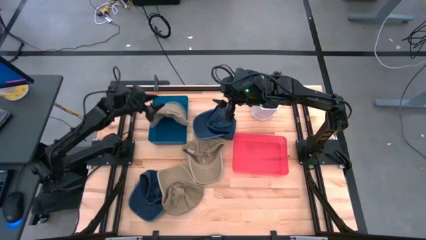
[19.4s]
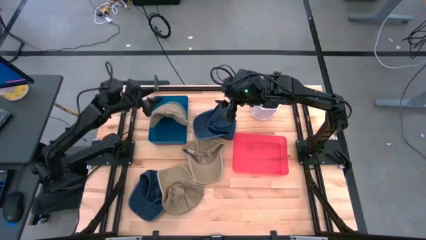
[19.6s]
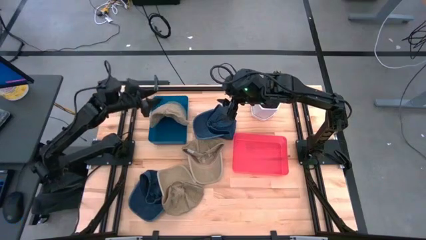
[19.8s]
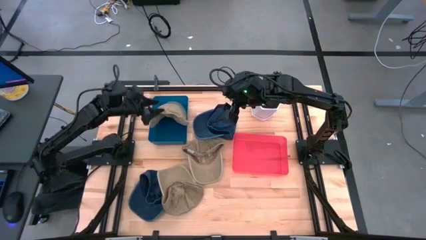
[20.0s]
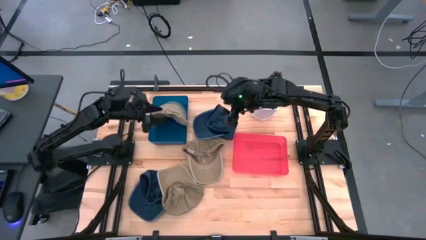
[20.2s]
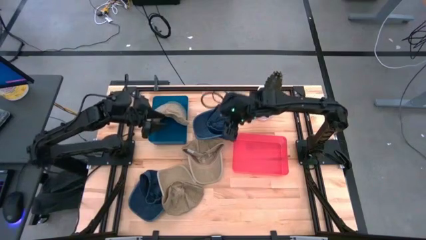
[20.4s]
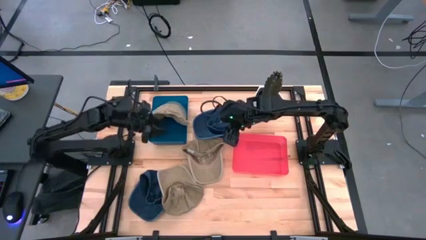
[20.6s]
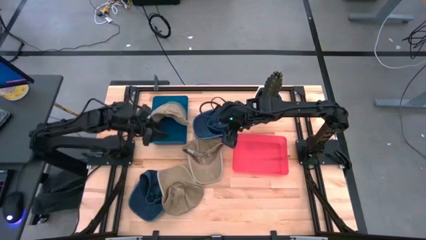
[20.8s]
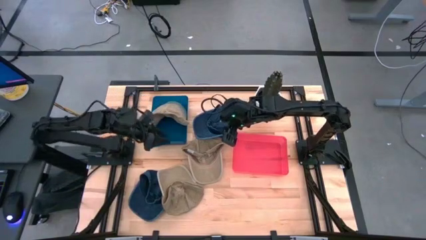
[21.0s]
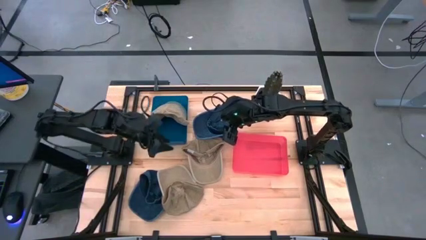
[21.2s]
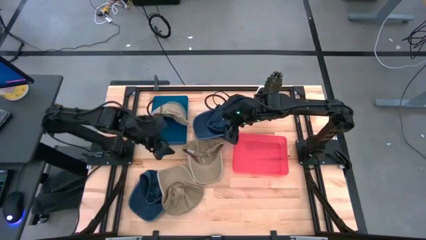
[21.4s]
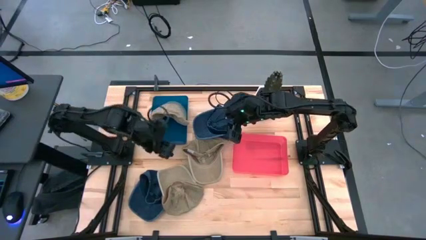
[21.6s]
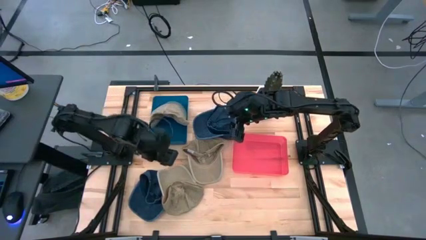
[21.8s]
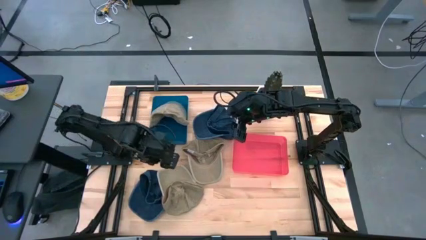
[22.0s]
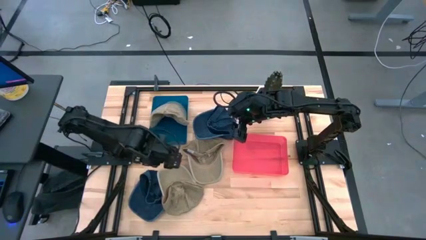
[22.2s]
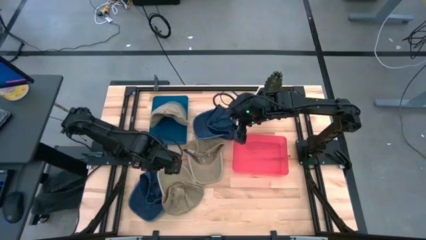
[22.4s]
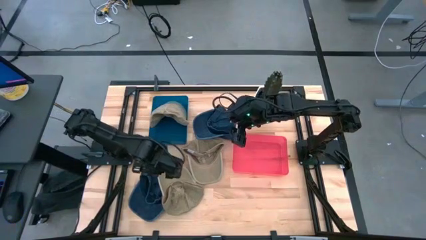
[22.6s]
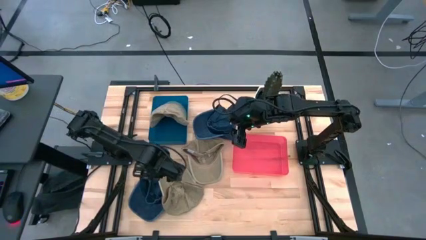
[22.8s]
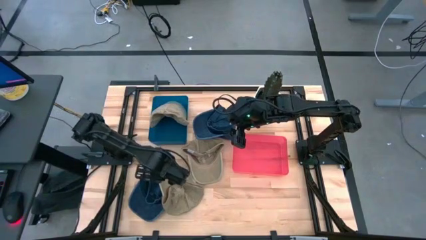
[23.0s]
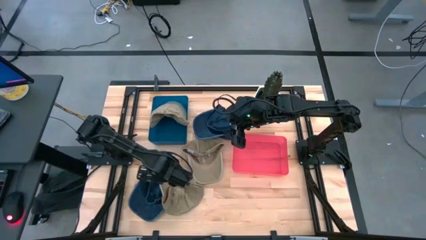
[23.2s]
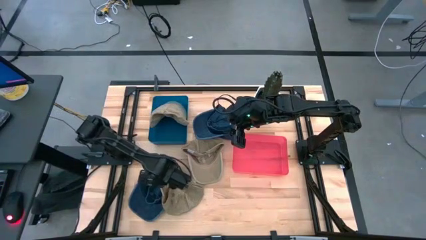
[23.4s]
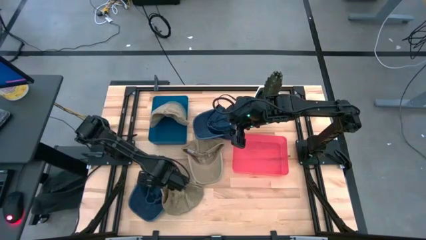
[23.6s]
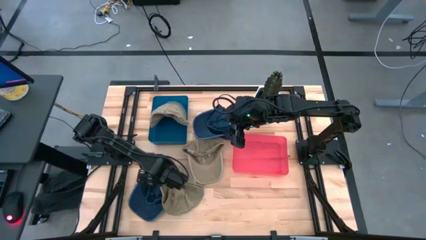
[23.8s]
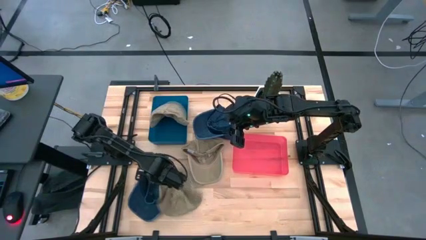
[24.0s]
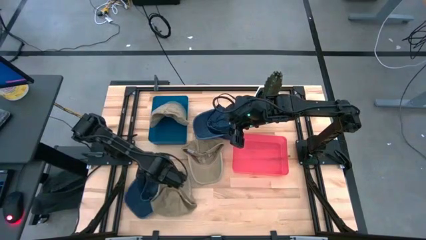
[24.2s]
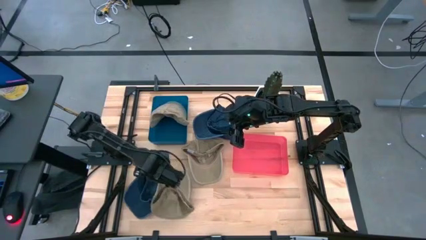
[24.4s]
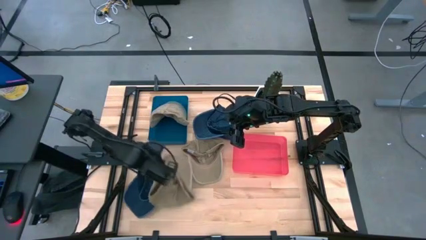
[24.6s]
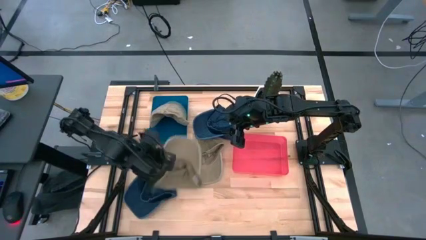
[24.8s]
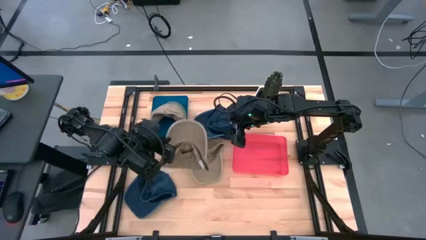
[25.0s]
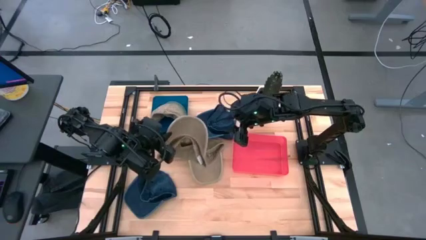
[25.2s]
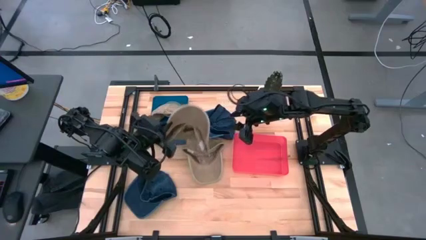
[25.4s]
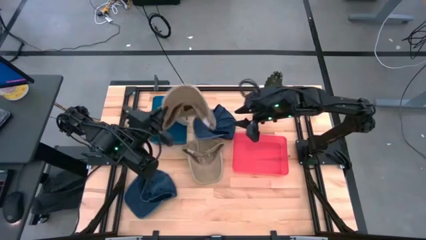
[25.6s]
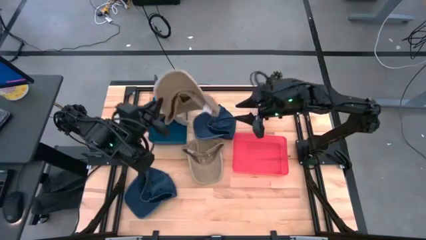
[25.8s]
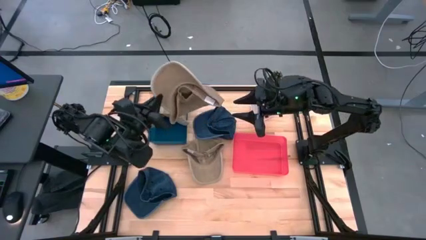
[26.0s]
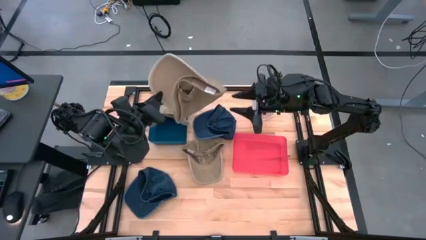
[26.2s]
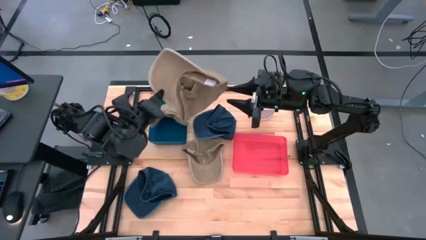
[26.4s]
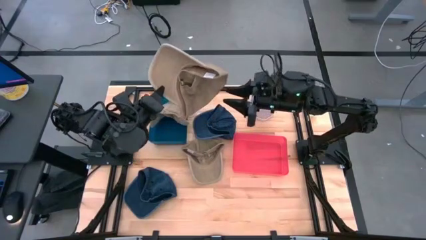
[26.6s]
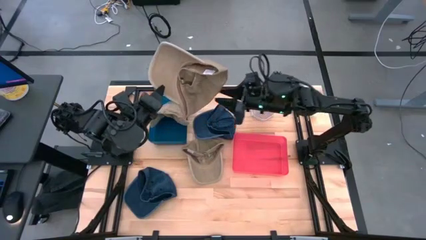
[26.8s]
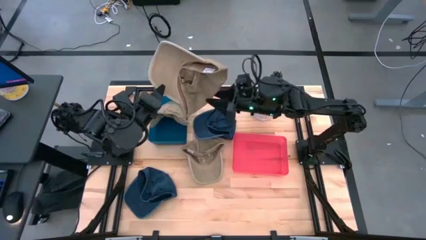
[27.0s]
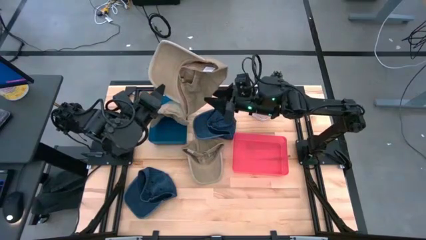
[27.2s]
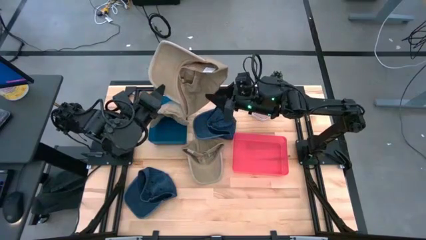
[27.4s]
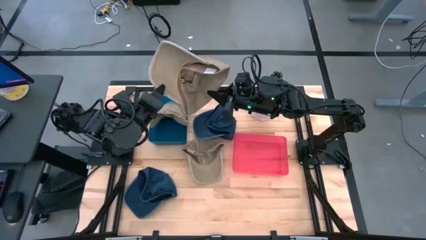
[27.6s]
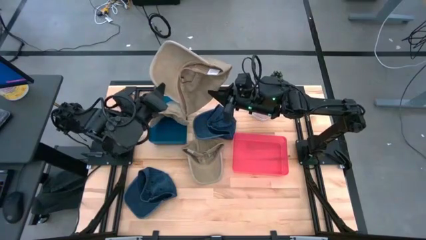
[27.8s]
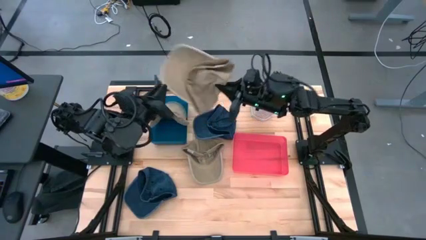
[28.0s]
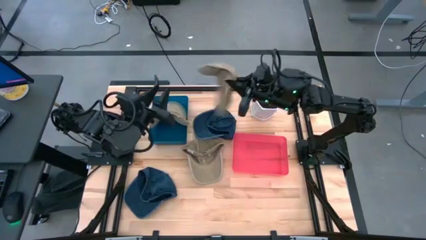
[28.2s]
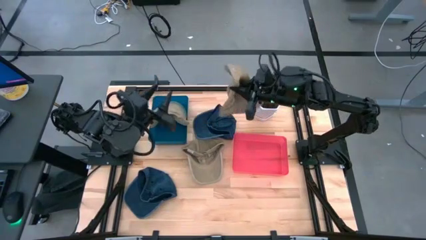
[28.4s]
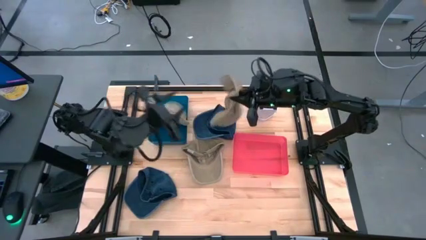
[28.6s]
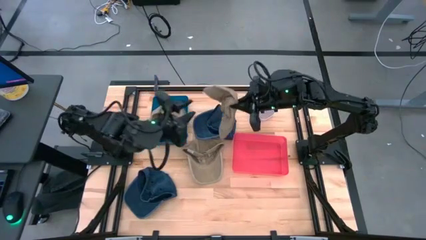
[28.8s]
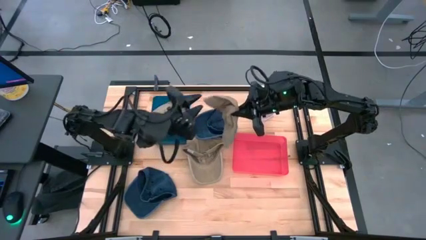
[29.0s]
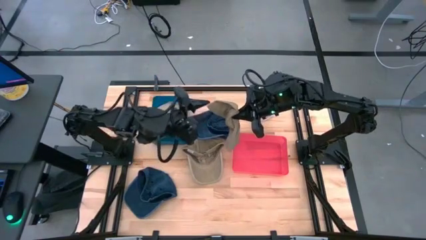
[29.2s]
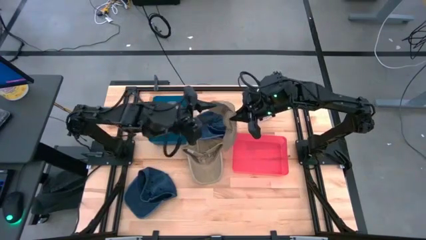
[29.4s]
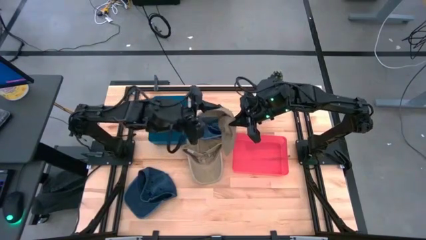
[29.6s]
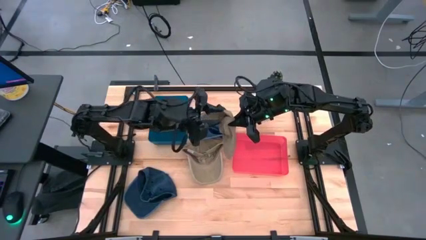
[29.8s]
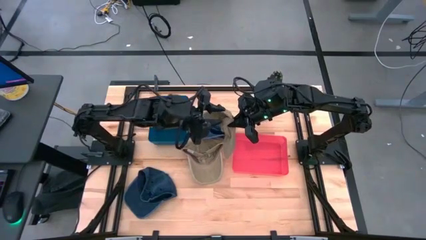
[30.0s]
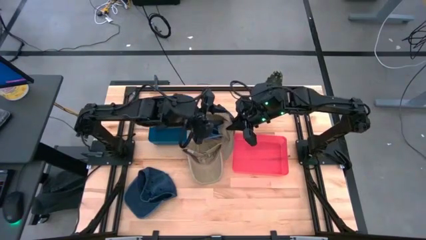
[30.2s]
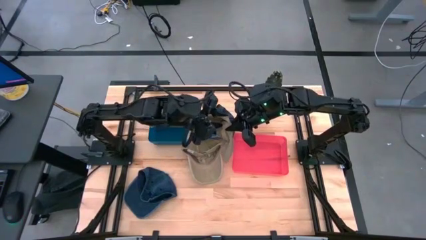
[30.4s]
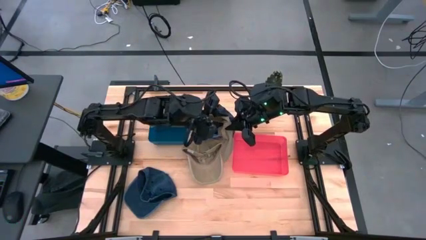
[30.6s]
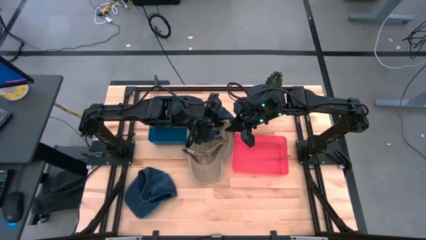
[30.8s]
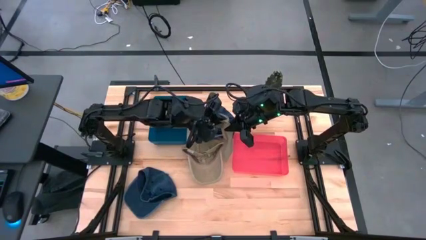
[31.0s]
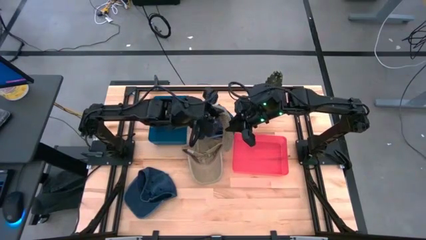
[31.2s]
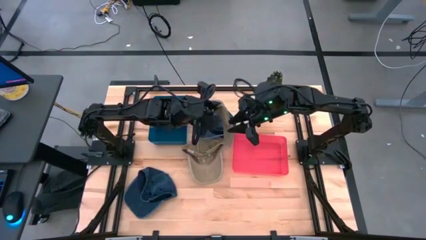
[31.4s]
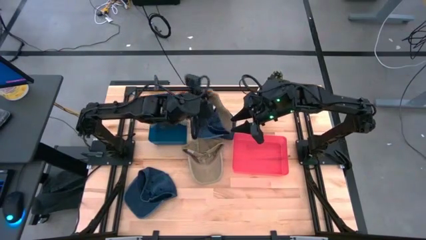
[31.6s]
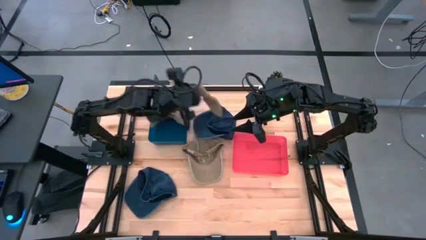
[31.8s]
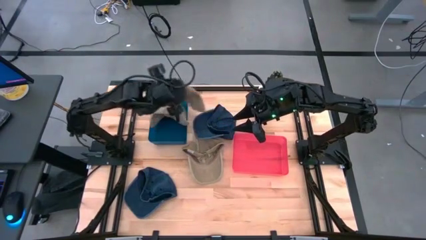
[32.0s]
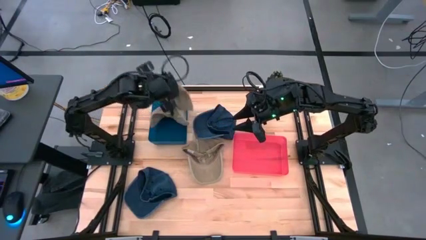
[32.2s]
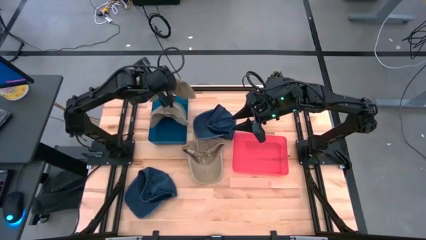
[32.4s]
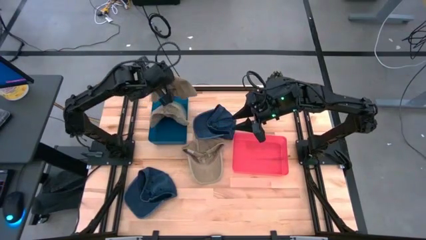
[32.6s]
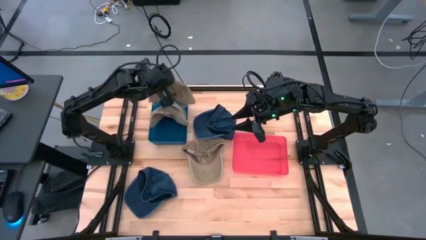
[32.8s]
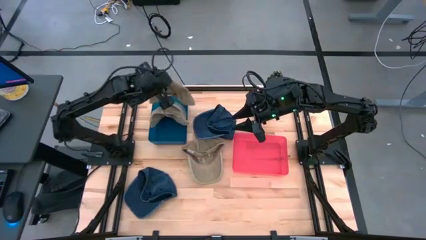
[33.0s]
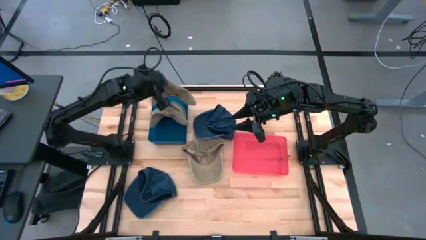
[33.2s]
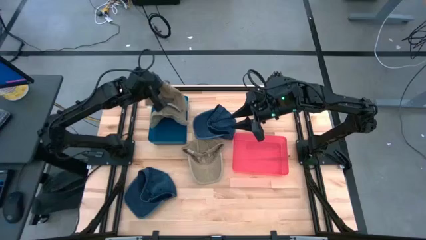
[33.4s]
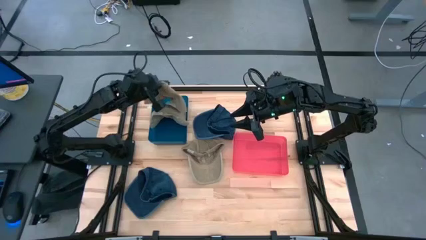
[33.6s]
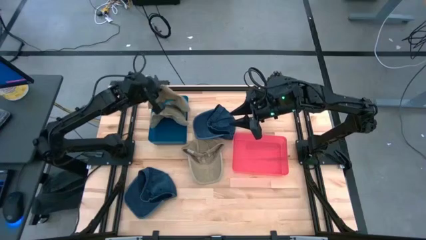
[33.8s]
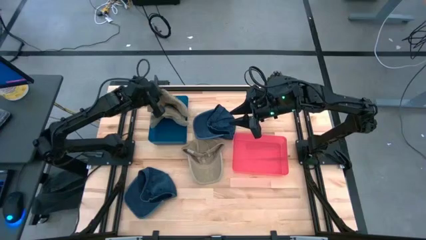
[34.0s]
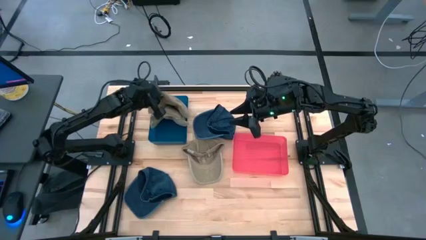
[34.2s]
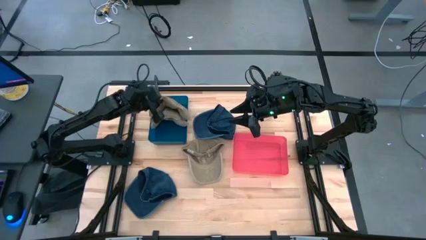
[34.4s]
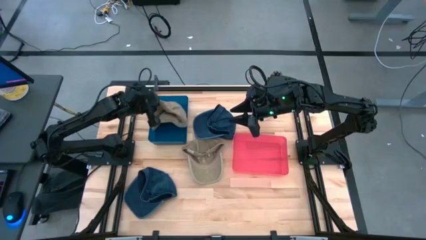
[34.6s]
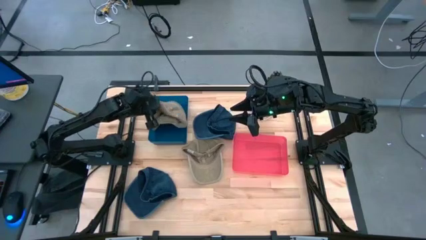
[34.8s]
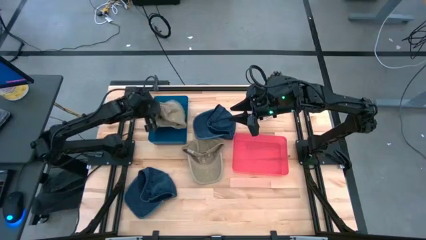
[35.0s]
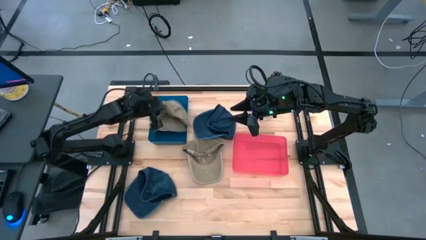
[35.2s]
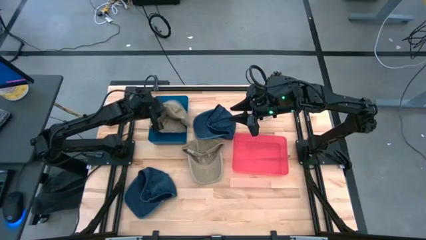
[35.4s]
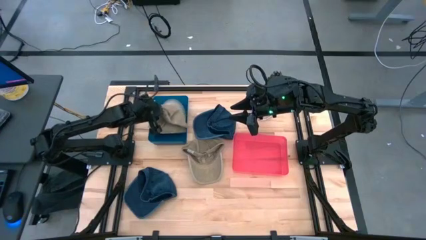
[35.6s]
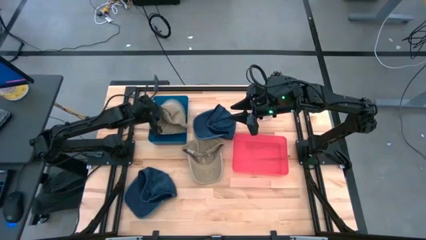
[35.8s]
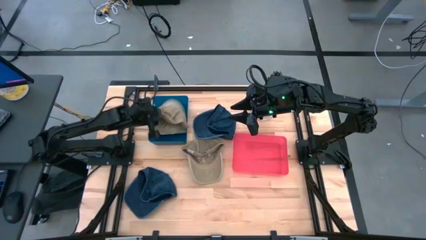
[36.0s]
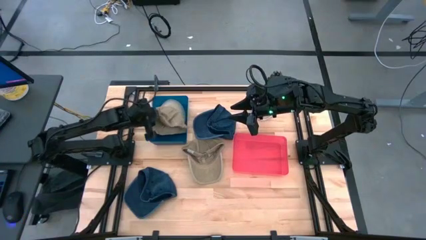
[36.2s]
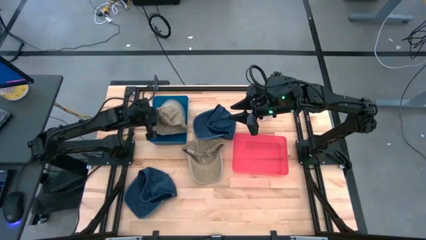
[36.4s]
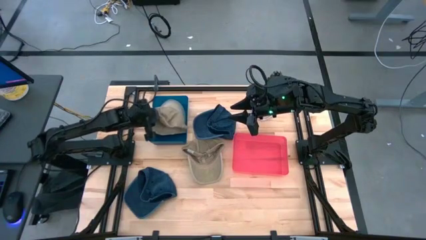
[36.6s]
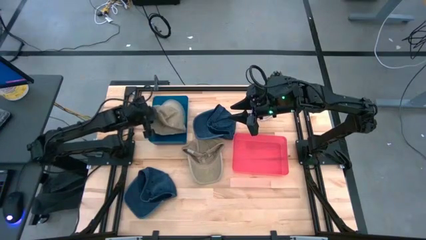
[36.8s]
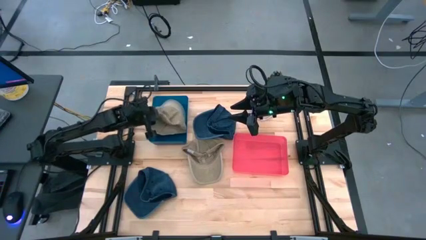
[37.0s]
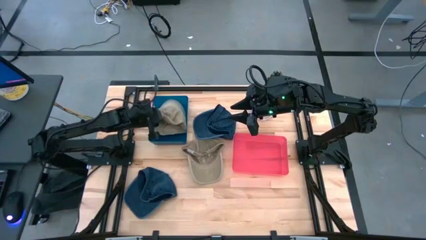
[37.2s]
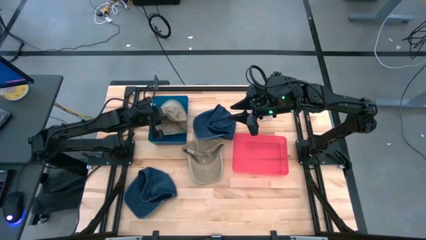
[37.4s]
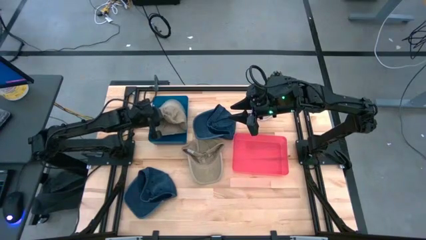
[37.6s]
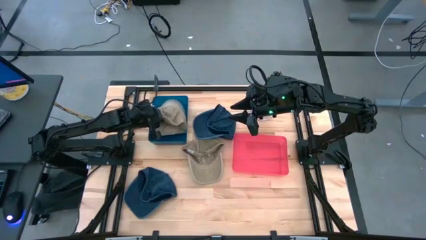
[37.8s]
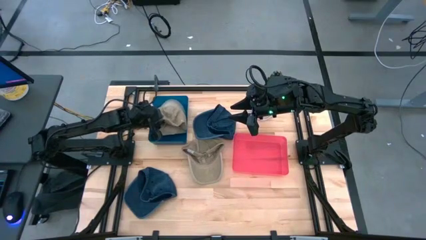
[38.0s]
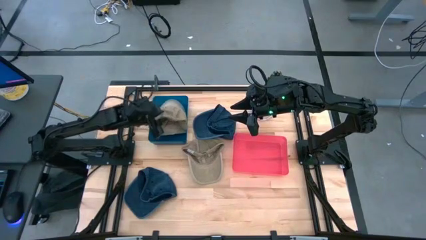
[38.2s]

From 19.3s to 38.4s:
Task: Pick & Place hat
Put the bottom brown cap into the blue bin
